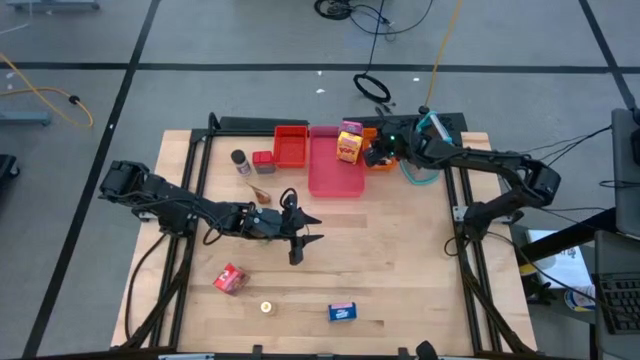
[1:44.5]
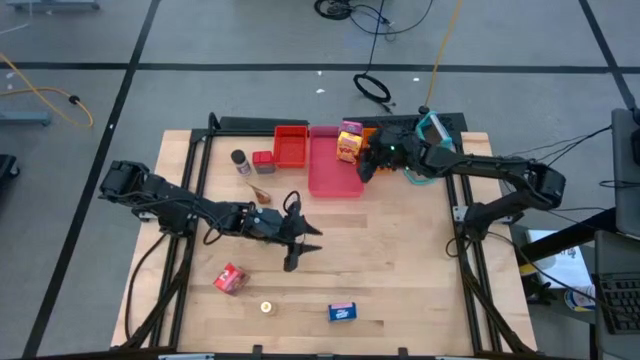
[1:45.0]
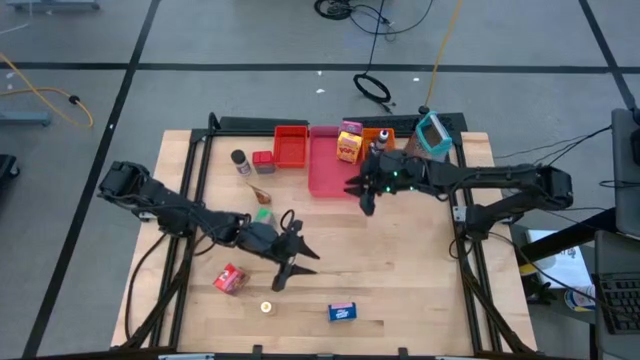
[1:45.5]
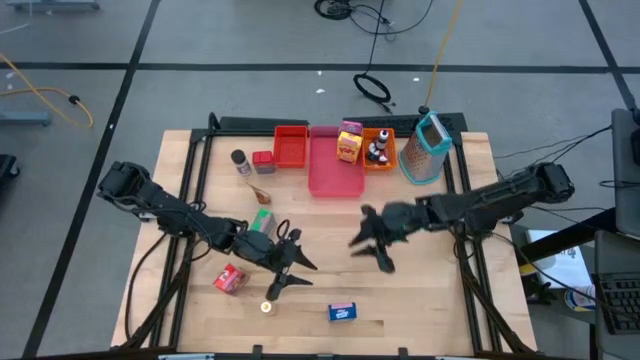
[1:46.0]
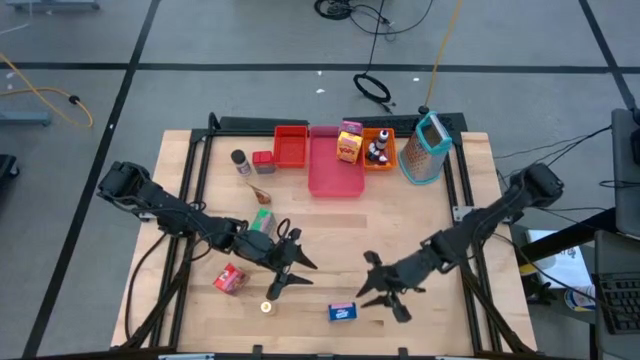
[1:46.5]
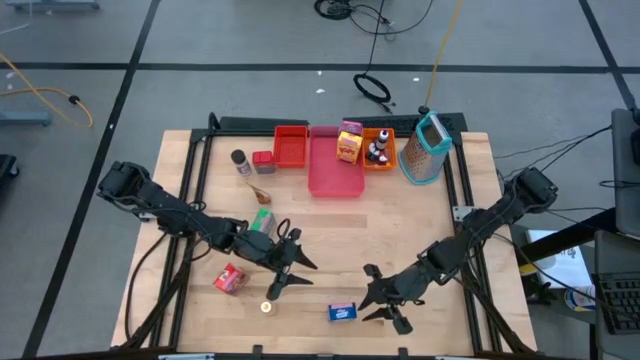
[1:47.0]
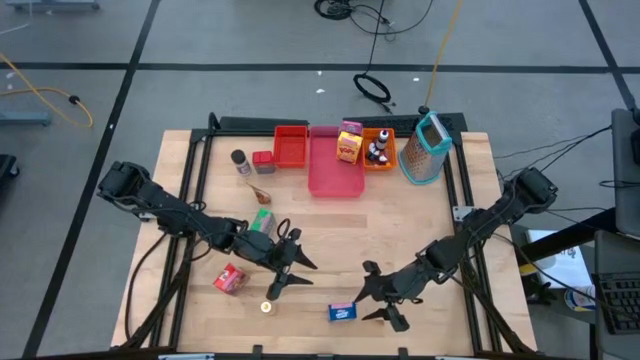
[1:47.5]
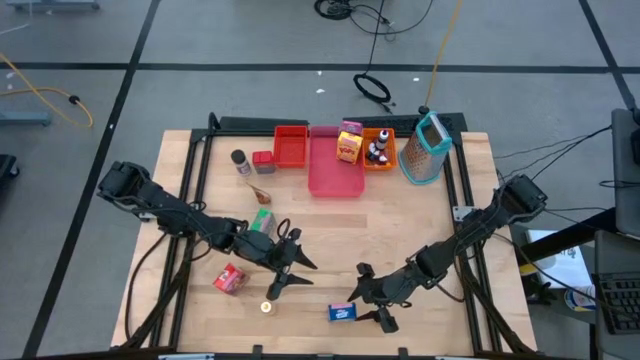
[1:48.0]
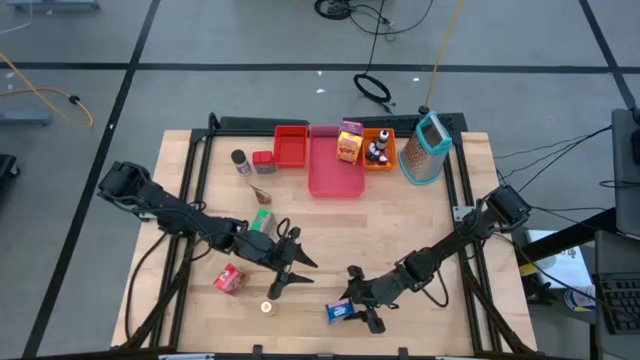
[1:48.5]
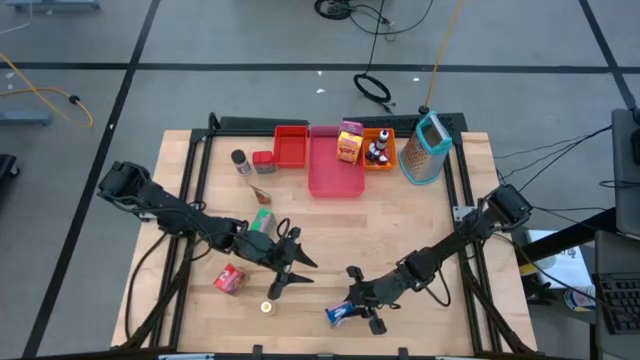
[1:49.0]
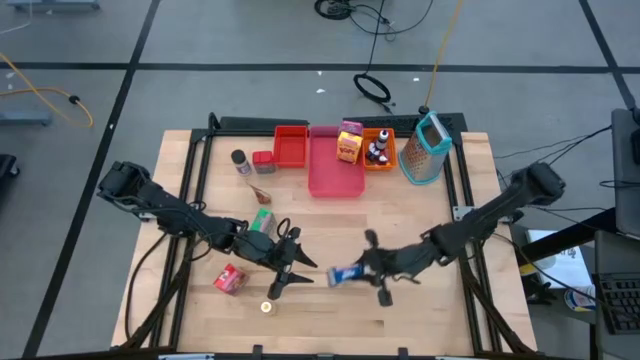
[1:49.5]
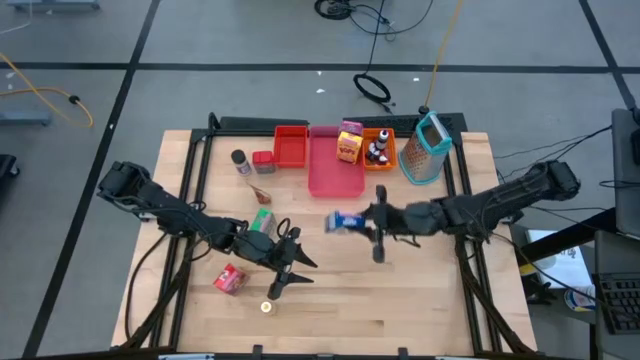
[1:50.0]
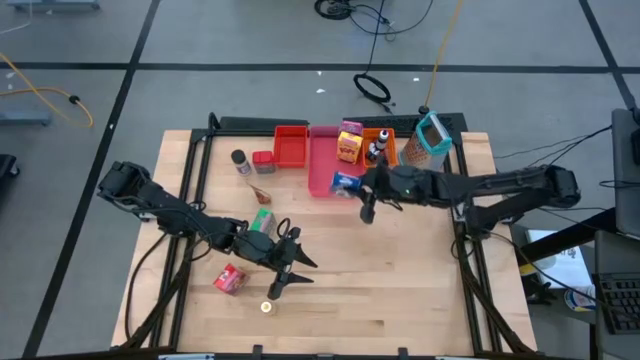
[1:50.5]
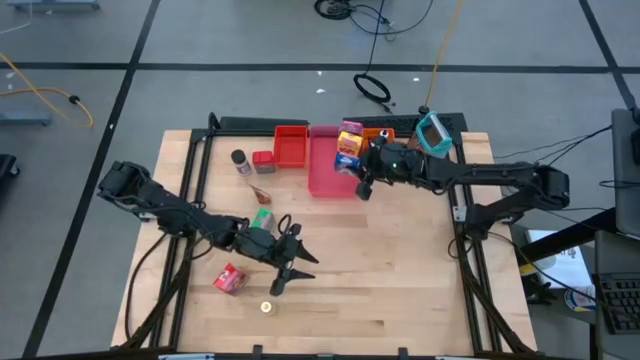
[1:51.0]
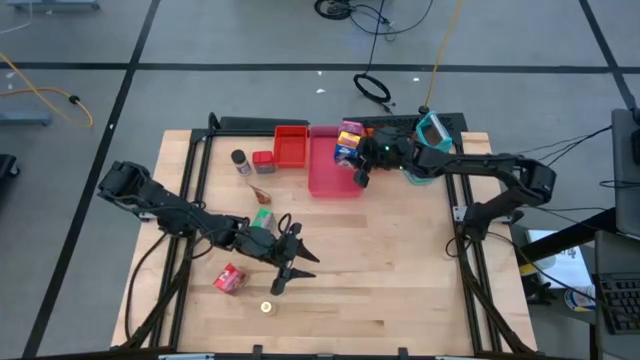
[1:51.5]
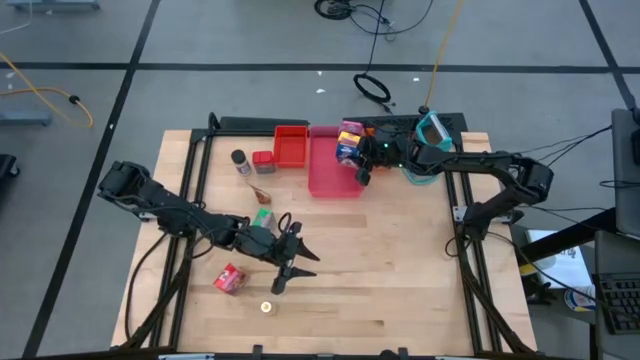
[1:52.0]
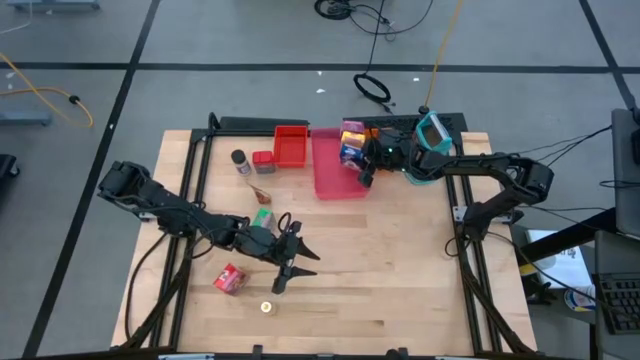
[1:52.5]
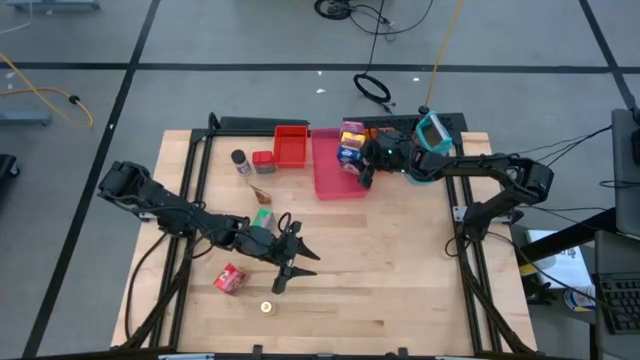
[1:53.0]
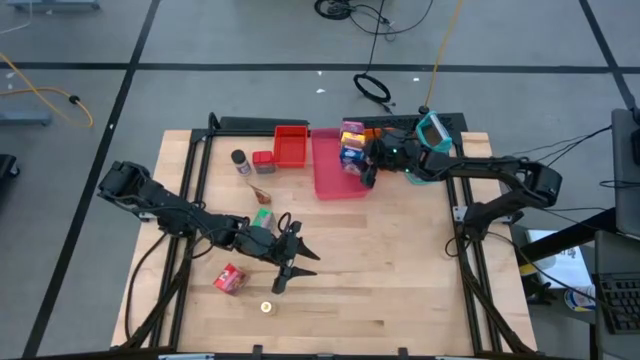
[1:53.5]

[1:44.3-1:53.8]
Task: Pick & Place Kitchen Items
Put the blue cereal box into the pink bin

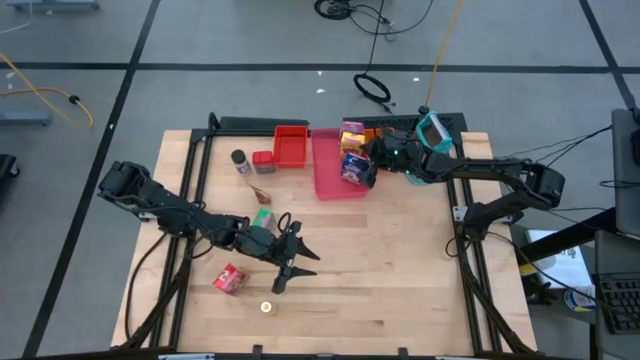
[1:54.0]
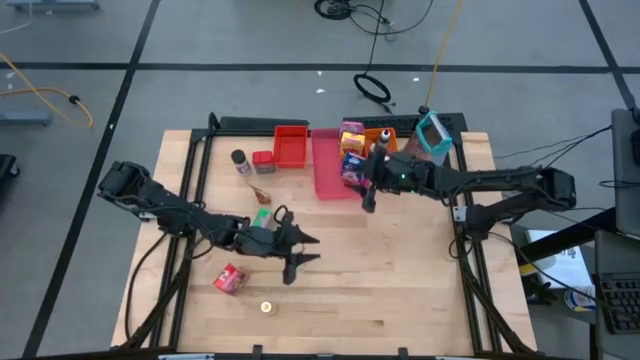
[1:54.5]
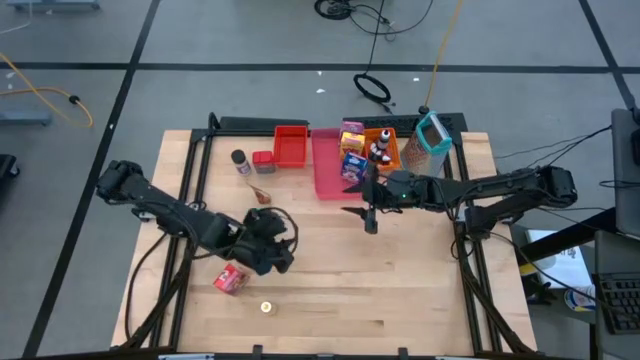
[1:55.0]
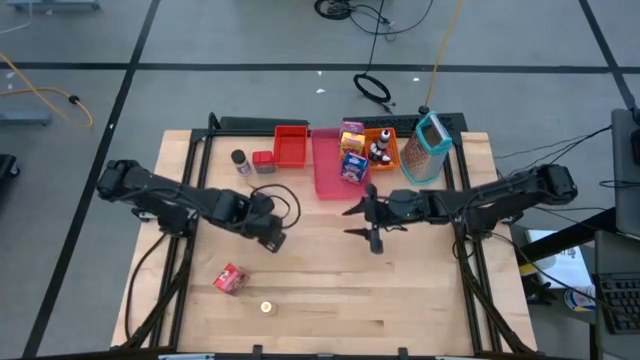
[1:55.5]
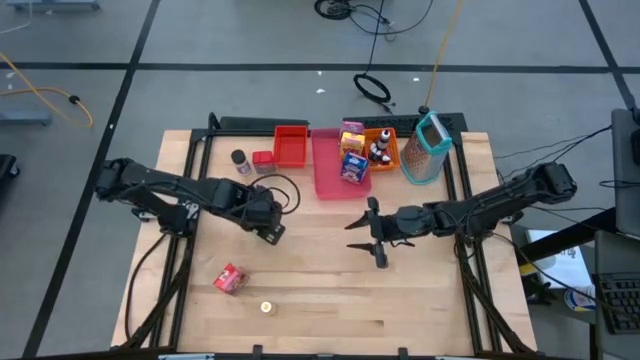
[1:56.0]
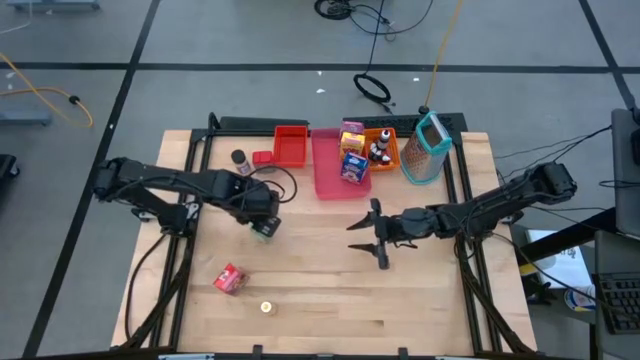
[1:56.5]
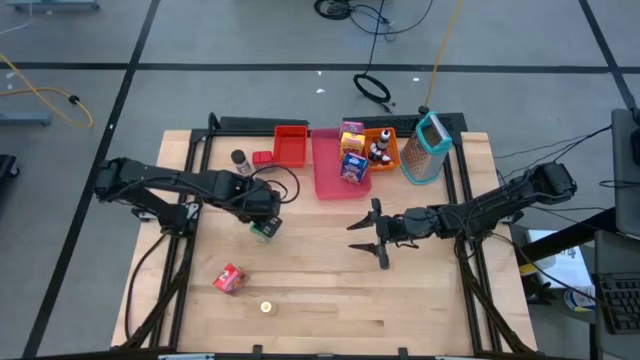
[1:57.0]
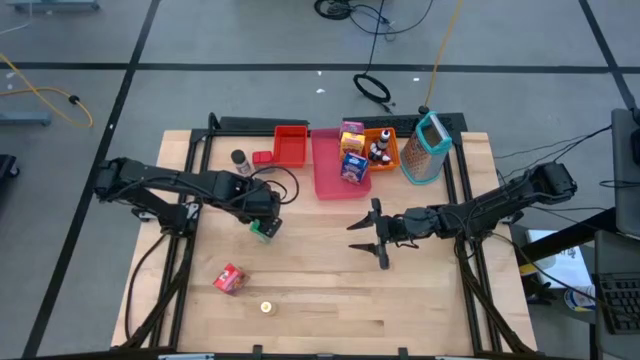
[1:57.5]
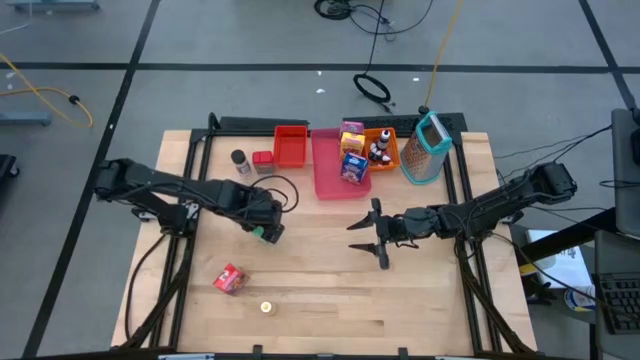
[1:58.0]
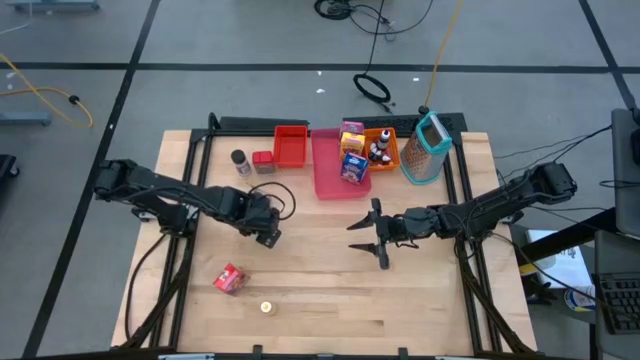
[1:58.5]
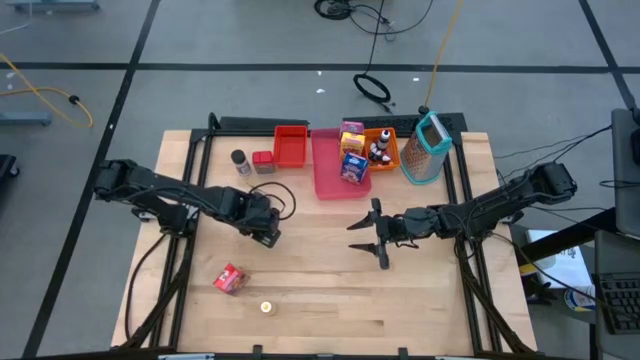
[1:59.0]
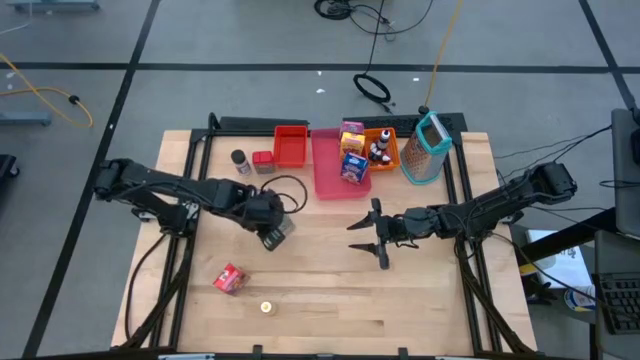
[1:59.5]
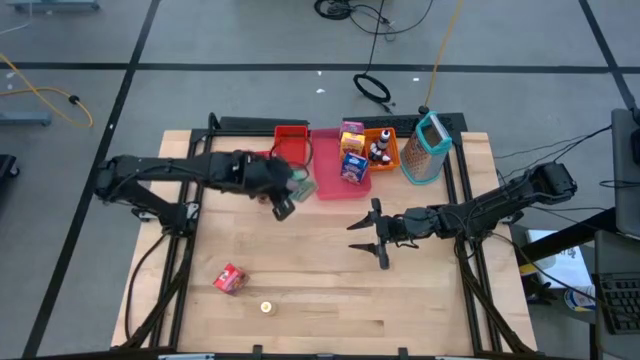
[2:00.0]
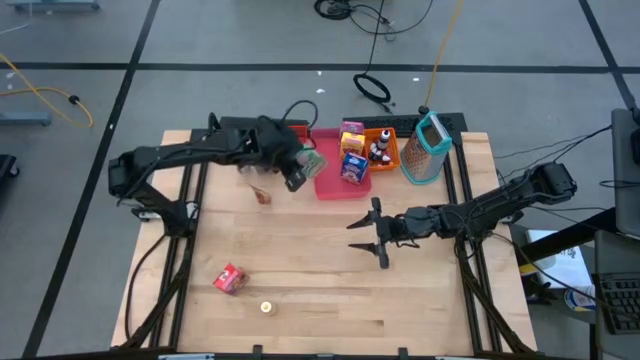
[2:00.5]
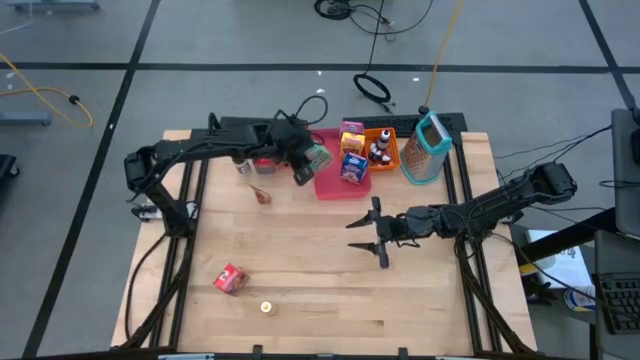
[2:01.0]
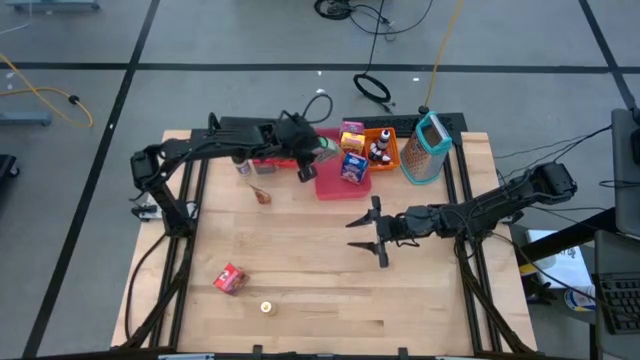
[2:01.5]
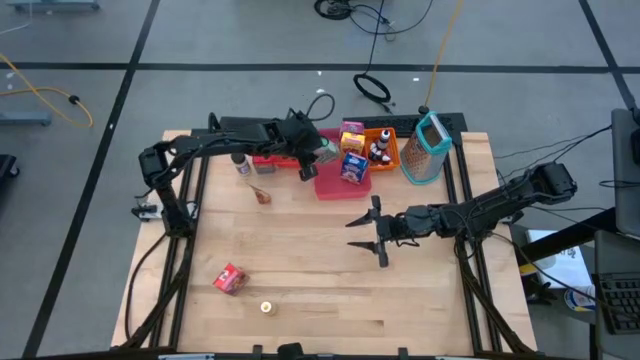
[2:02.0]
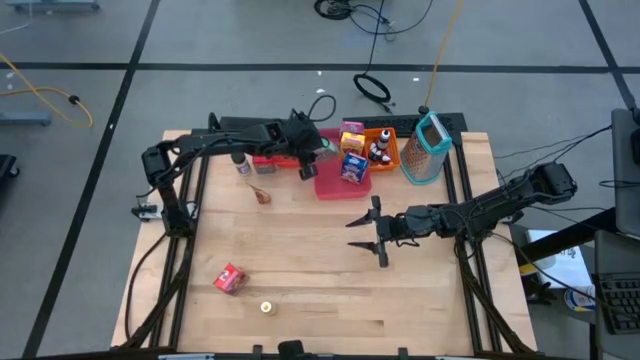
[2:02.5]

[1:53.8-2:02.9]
Put the green cereal box into the pink bin

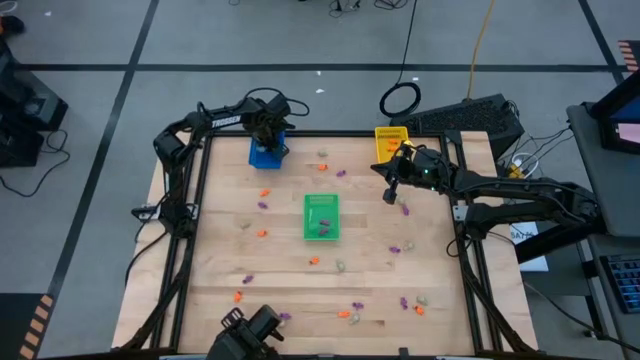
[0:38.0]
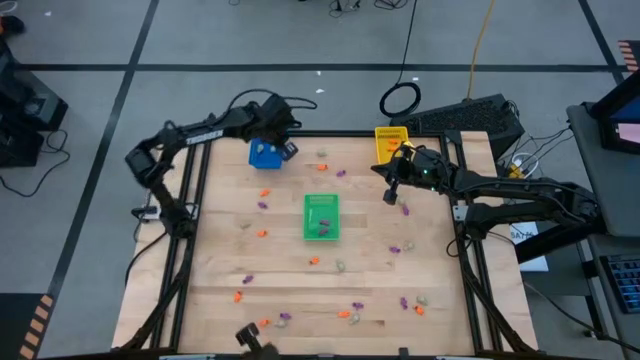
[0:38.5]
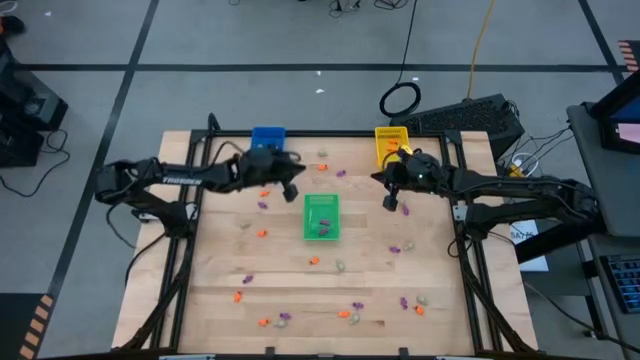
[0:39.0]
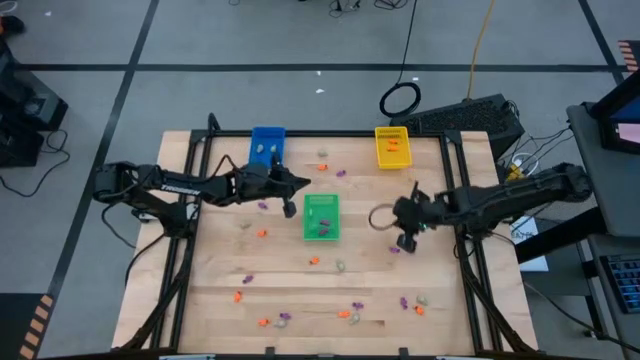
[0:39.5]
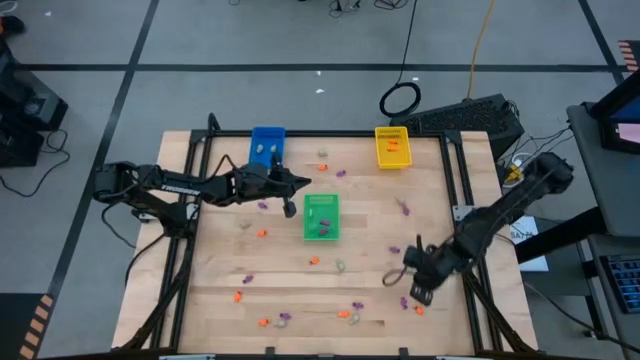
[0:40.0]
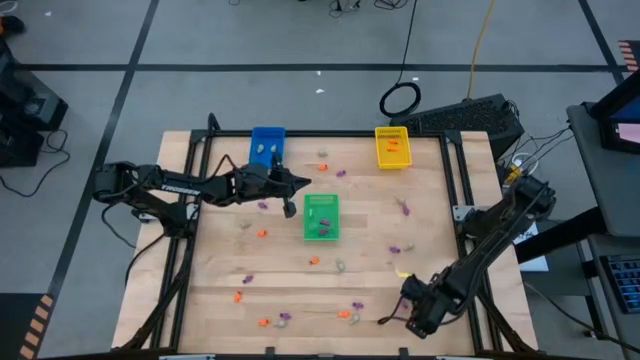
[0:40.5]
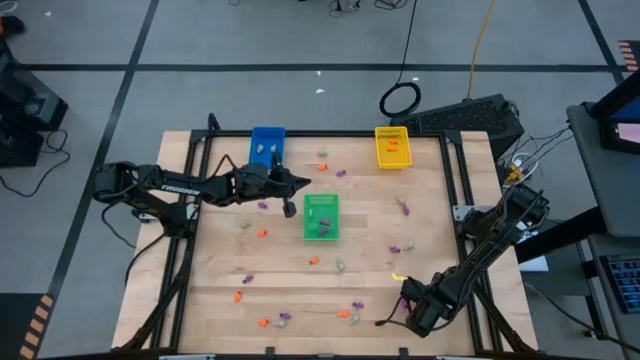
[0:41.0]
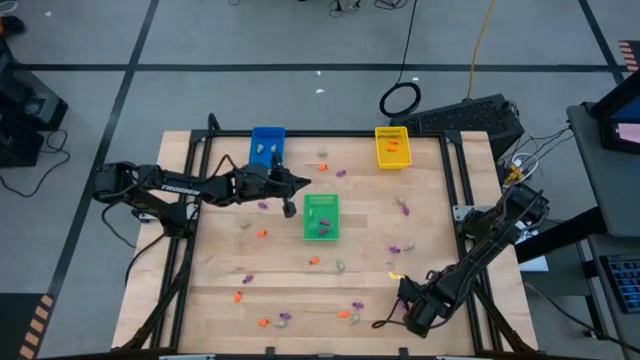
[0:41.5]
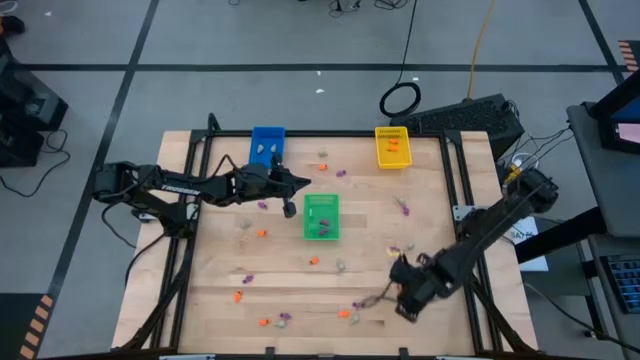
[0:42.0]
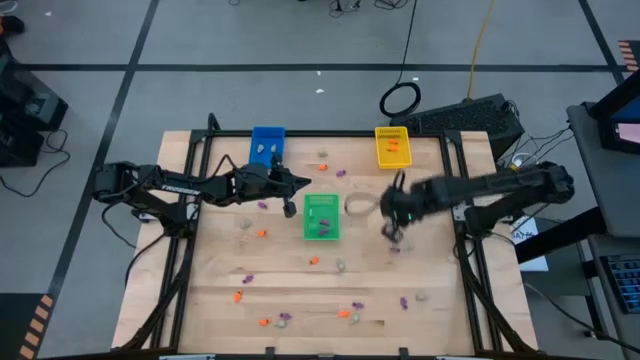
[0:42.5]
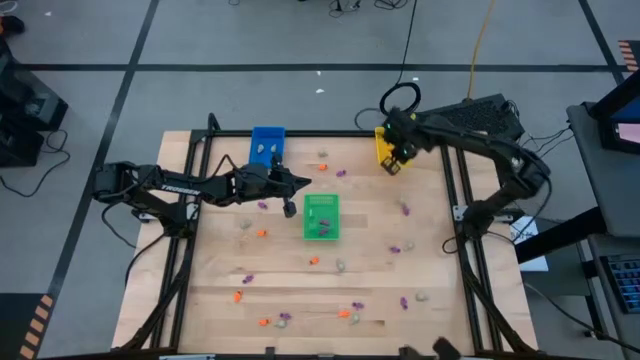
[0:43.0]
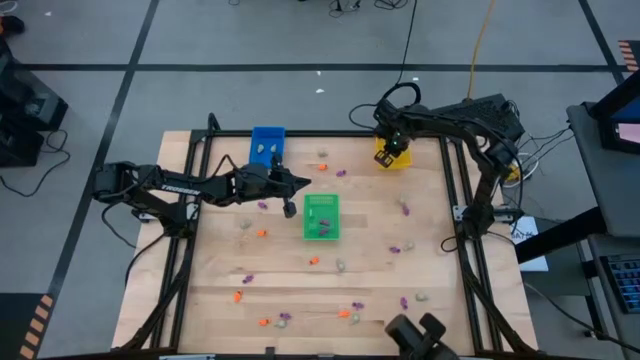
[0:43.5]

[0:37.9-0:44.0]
Task: Sort Halloween decoration
Put the orange skeleton toy into the yellow bin
